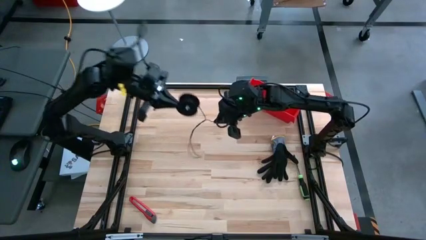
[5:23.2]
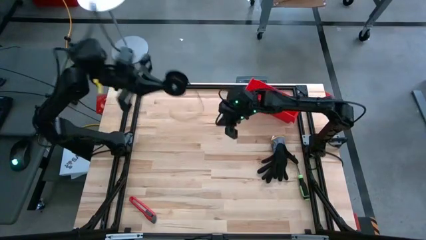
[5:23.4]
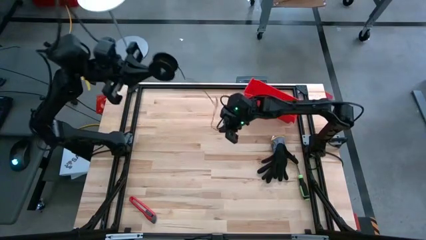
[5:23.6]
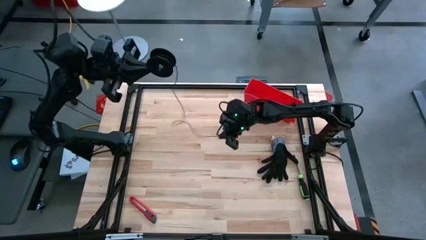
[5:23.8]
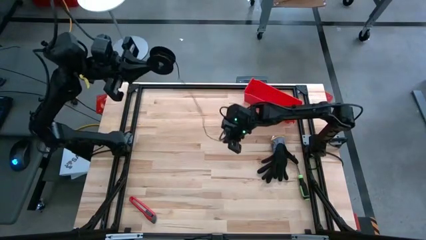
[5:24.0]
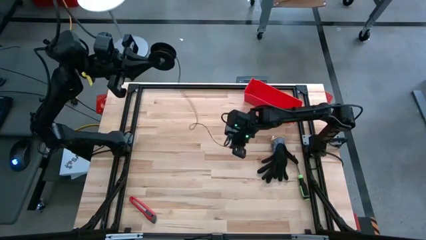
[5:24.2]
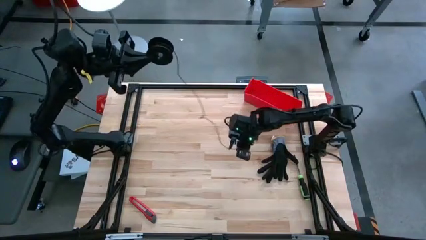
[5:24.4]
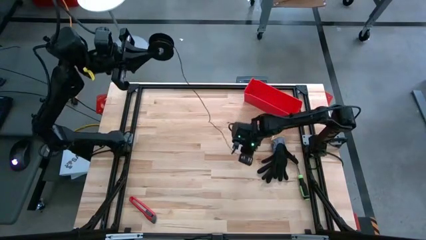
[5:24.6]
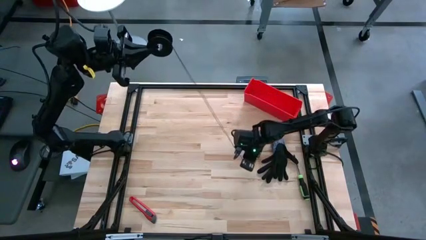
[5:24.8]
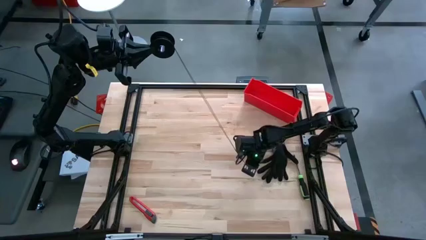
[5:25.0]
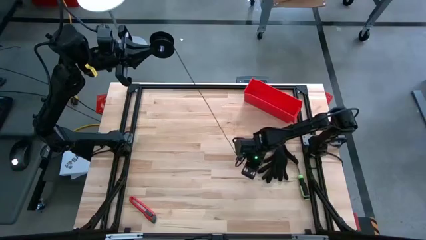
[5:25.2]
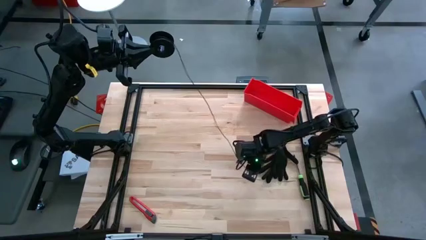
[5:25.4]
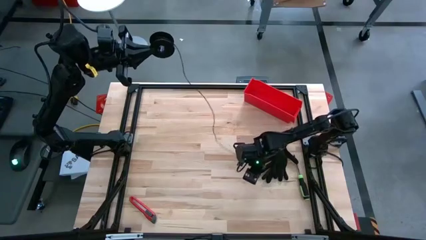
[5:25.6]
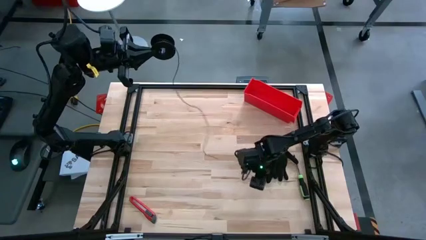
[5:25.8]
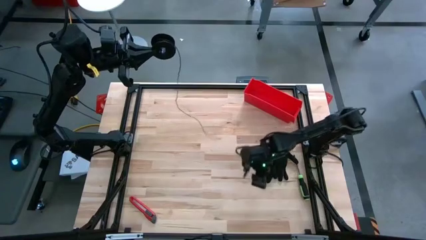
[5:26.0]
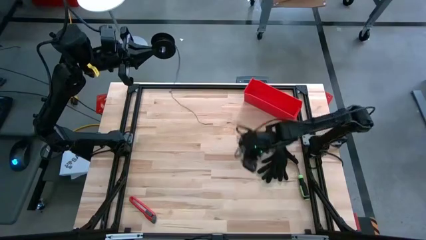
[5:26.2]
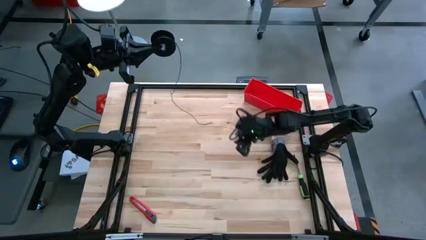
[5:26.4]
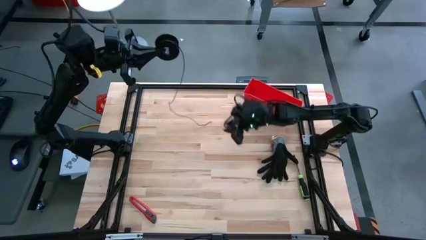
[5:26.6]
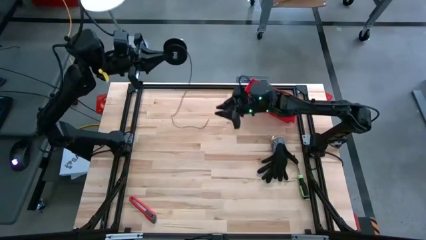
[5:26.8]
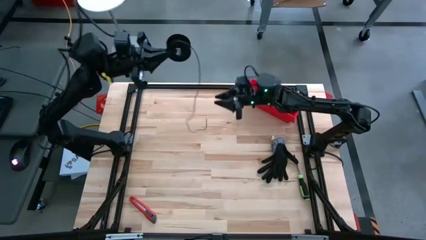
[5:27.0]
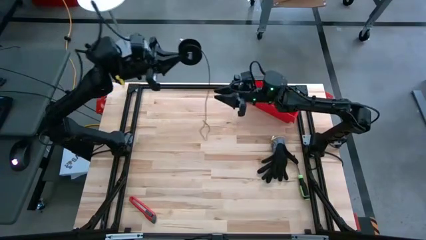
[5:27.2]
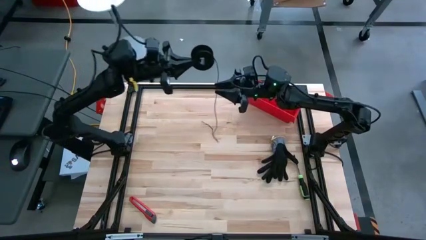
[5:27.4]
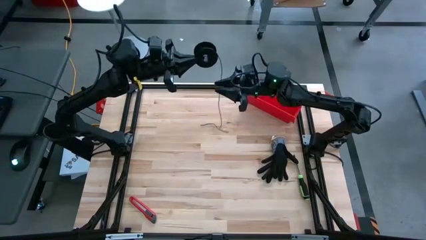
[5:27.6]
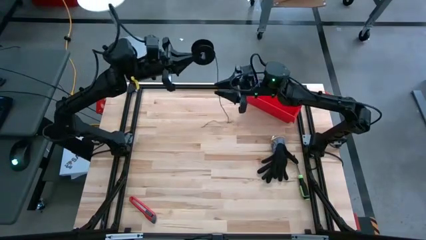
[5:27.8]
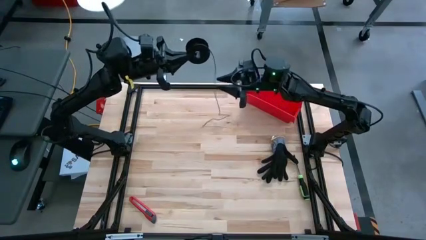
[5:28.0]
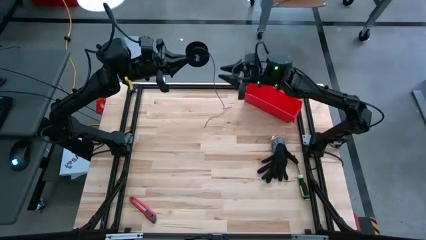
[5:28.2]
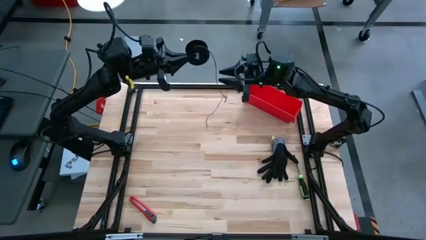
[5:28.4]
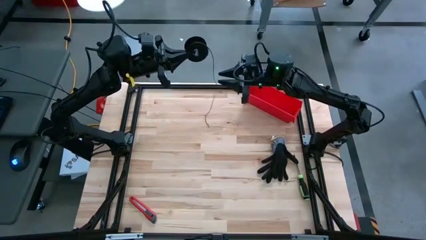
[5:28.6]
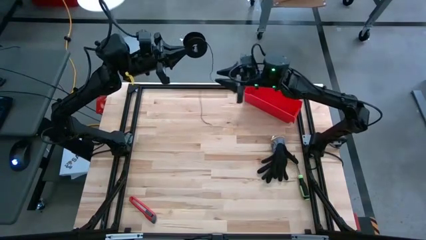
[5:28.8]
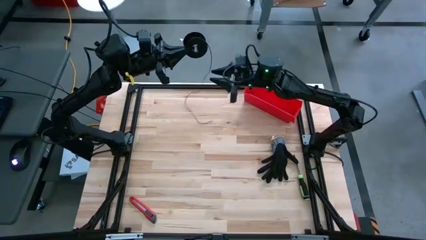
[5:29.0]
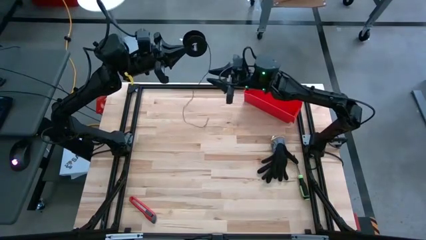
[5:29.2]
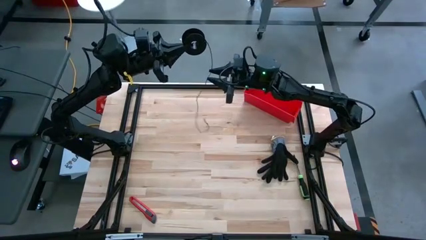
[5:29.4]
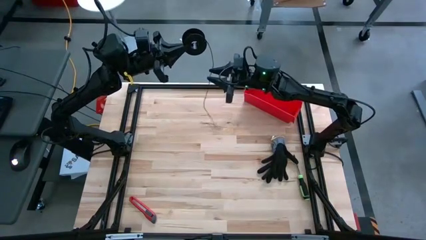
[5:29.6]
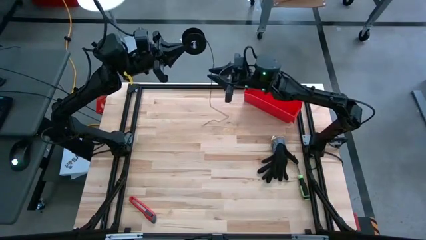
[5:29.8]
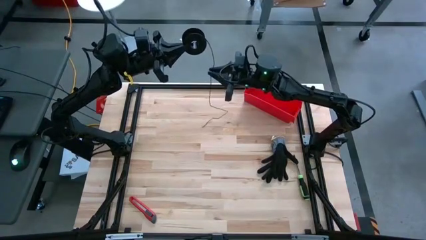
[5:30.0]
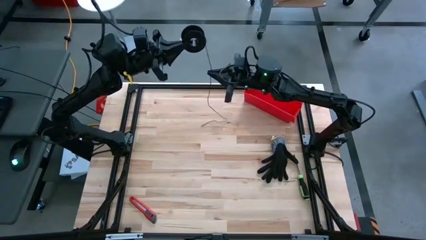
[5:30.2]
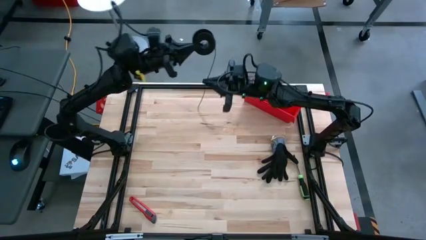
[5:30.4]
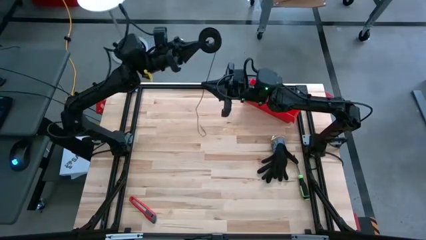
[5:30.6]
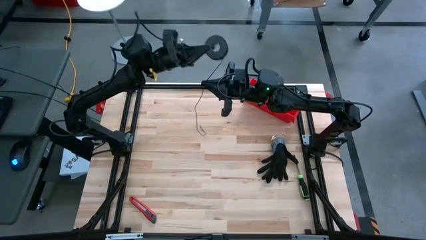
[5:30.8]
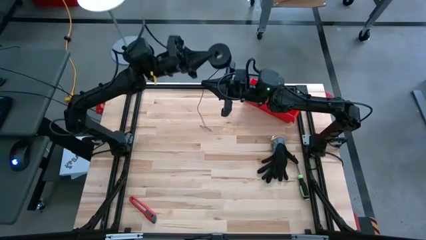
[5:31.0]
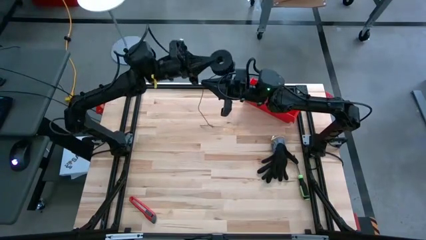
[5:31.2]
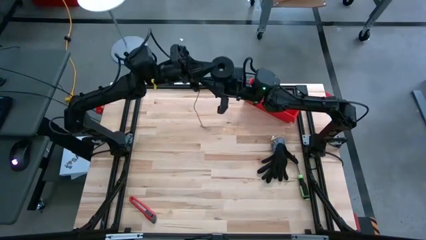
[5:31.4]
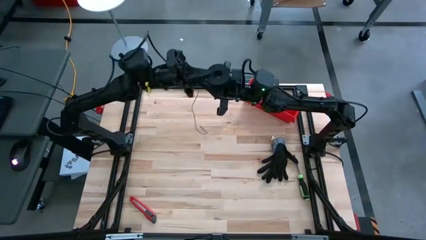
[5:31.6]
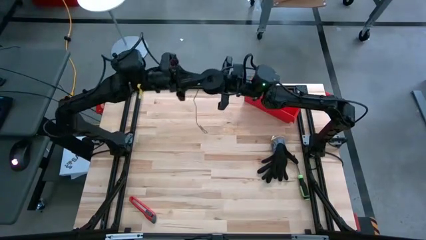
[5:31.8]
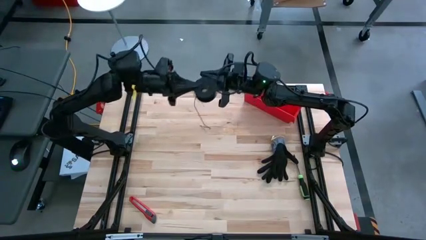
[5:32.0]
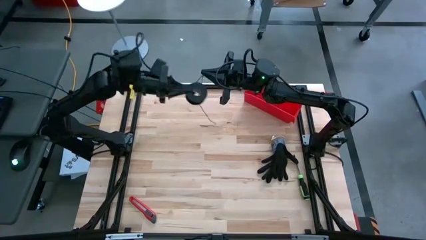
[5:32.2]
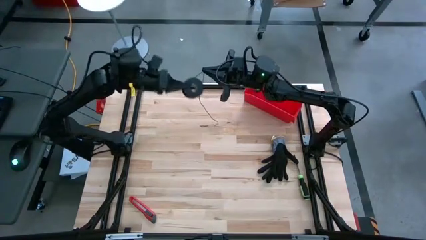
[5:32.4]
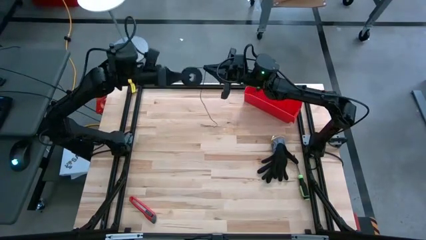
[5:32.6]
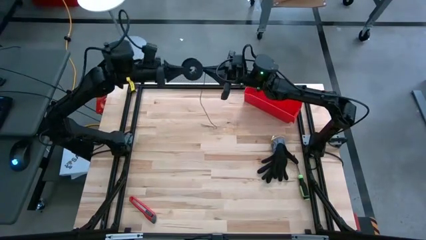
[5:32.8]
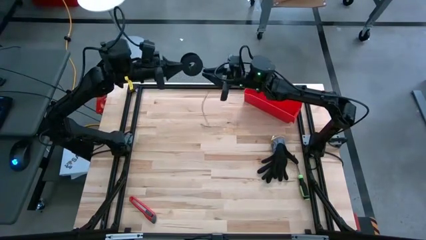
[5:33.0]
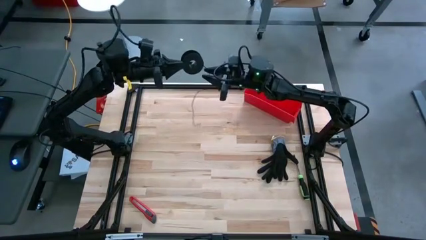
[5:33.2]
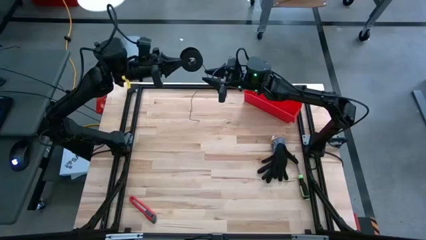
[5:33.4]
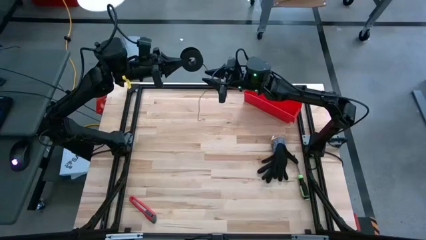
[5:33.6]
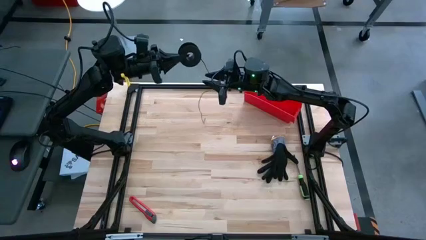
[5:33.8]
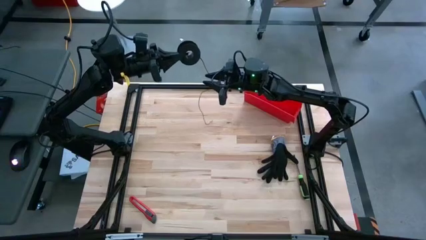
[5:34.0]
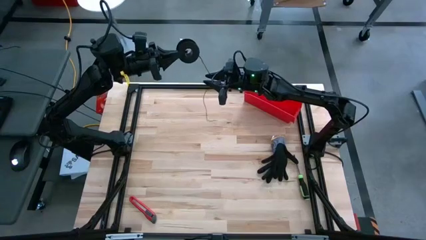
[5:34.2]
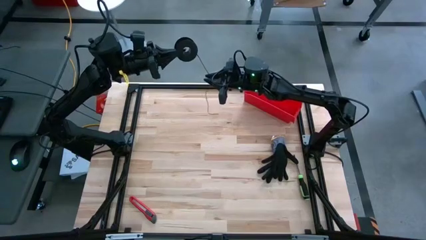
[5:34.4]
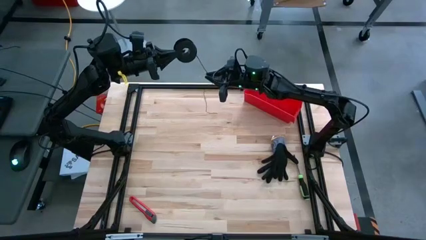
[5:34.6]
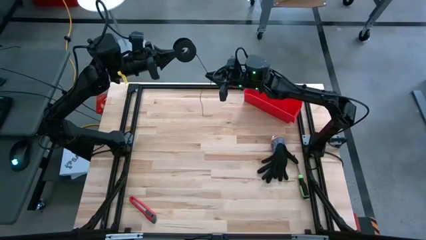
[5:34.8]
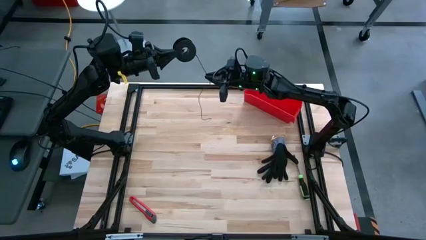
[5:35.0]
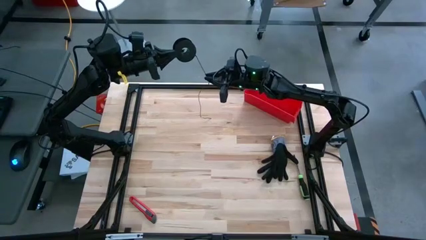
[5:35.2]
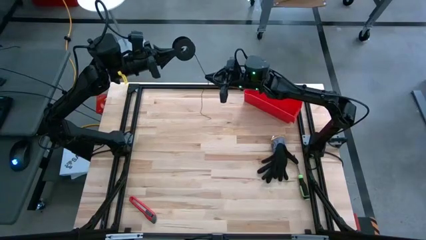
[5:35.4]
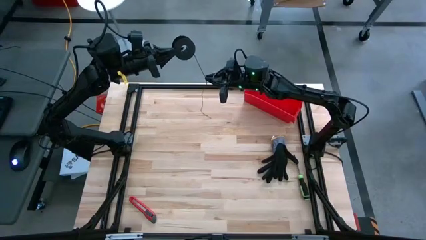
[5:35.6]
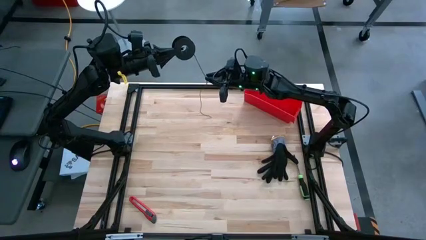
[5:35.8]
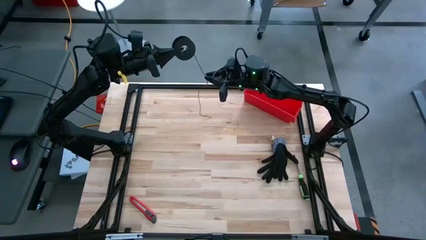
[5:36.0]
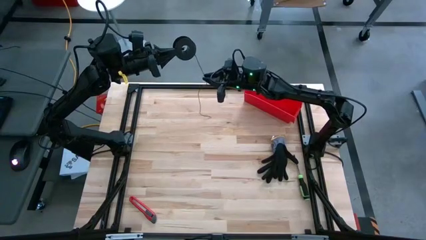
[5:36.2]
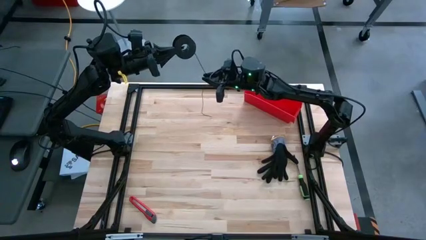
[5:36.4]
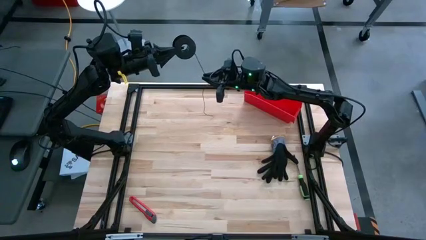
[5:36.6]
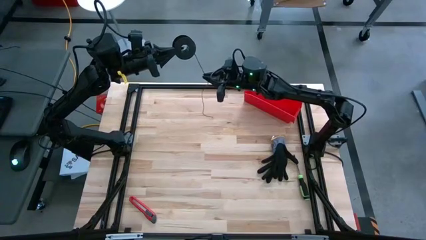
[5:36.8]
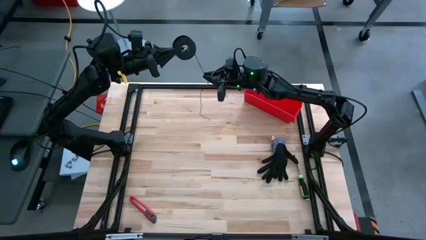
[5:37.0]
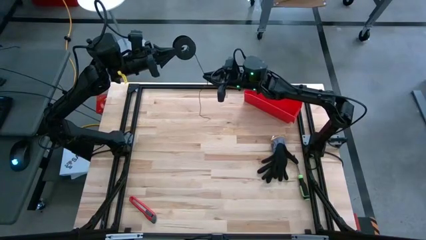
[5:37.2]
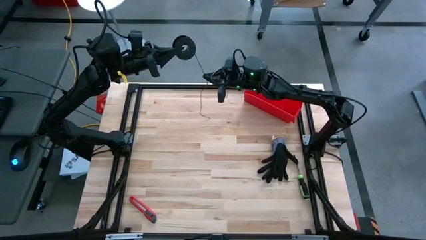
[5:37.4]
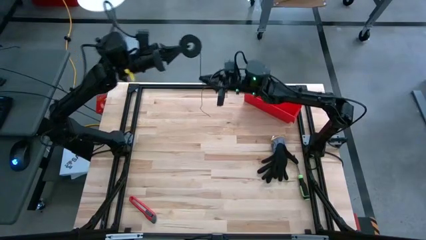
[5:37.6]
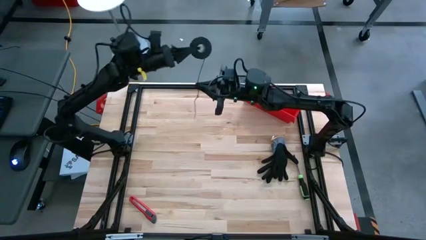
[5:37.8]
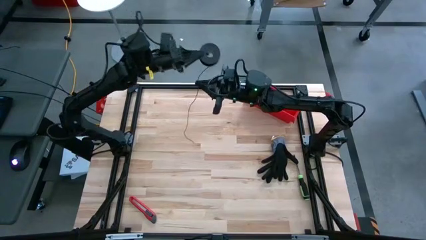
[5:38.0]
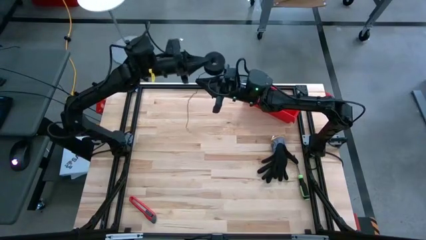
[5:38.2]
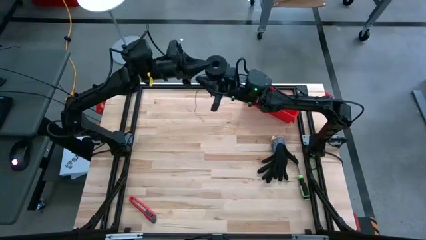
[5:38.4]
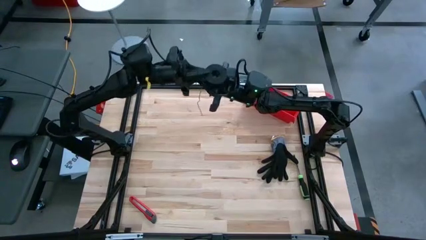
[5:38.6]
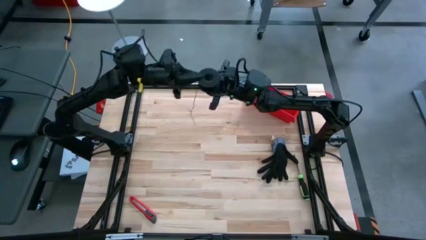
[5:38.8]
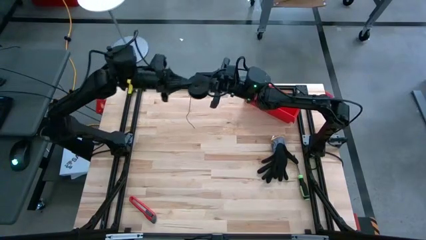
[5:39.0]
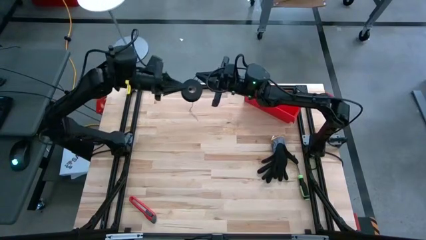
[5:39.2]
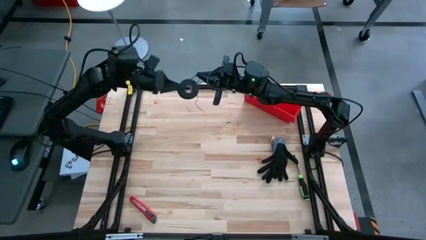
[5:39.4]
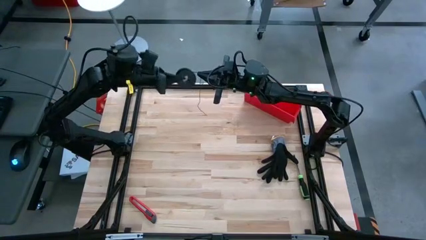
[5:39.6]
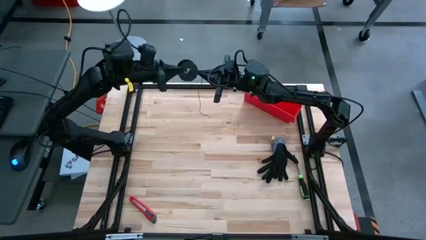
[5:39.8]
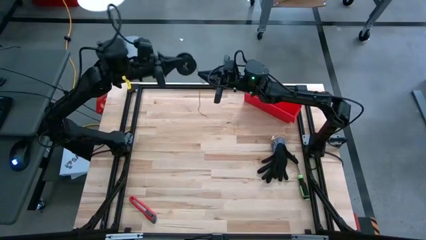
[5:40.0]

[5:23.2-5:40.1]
Task: Coil cords
Coil the black wire on the spool
